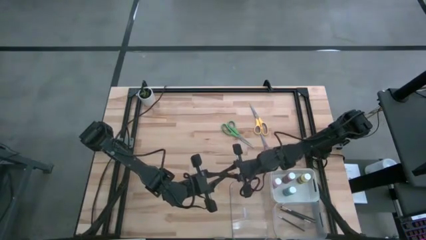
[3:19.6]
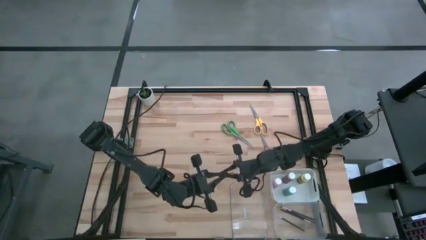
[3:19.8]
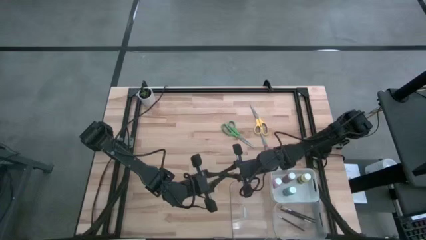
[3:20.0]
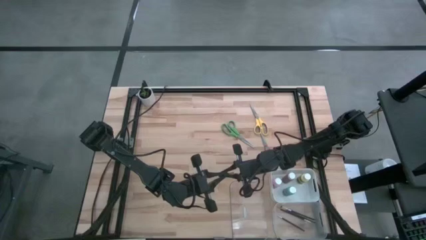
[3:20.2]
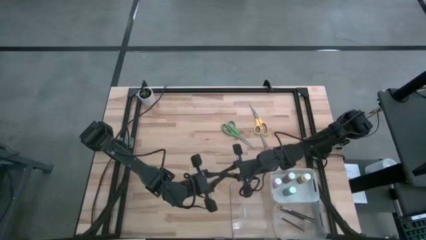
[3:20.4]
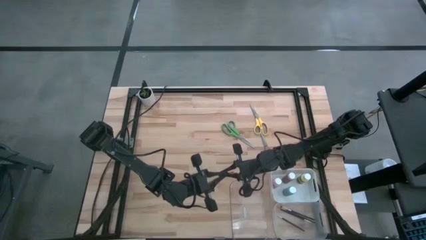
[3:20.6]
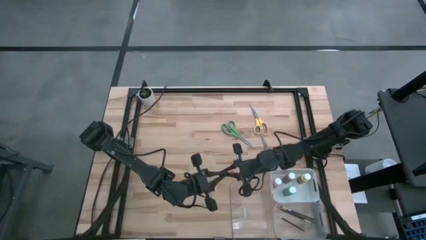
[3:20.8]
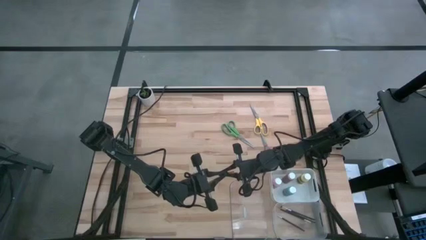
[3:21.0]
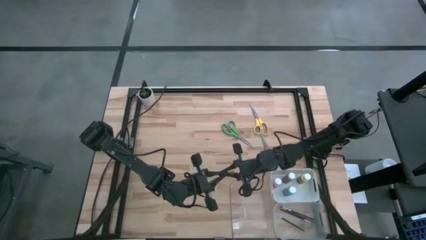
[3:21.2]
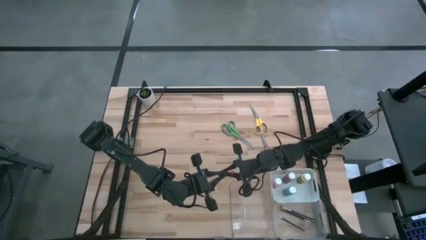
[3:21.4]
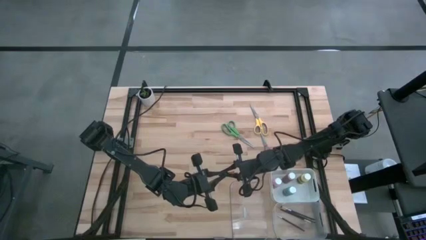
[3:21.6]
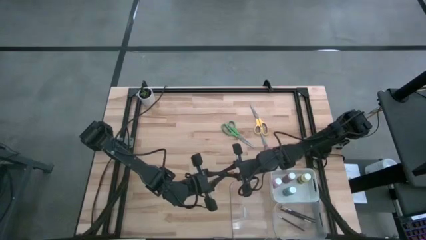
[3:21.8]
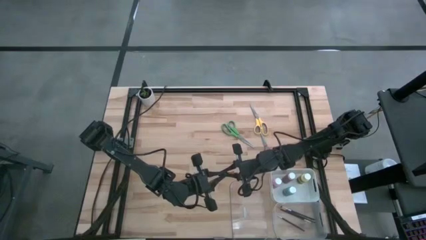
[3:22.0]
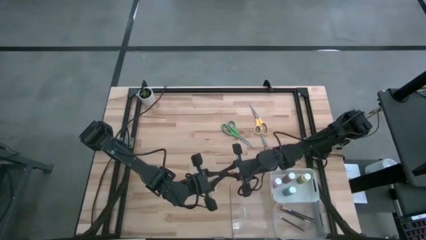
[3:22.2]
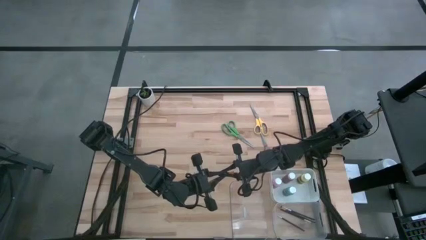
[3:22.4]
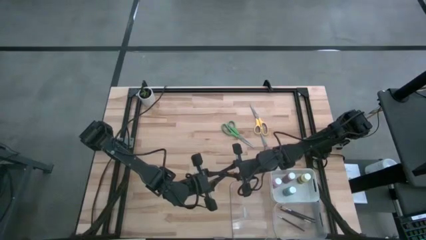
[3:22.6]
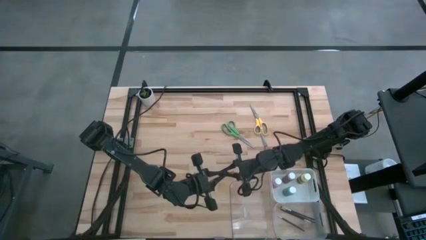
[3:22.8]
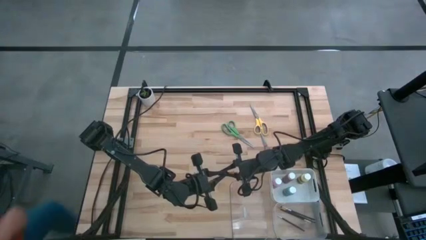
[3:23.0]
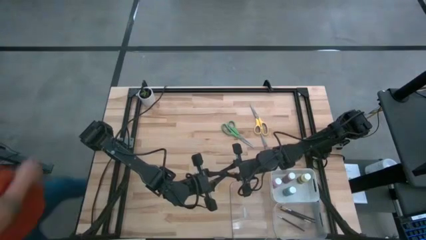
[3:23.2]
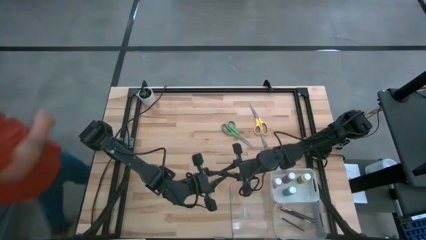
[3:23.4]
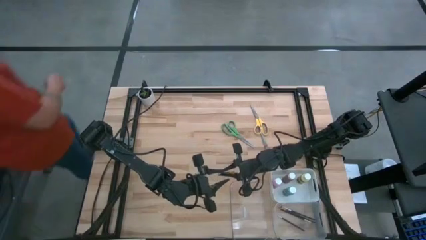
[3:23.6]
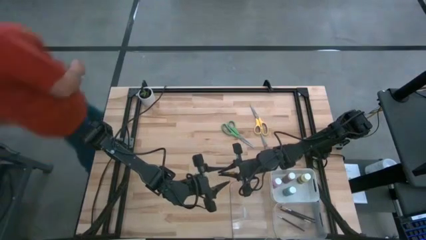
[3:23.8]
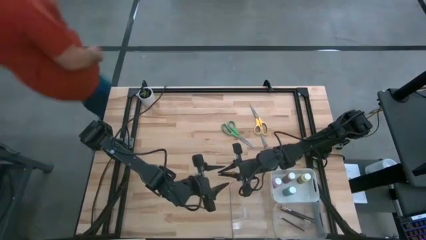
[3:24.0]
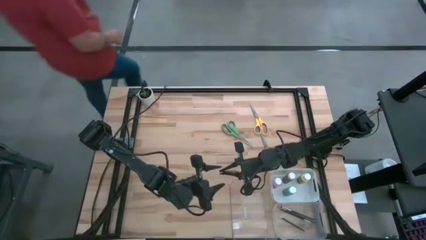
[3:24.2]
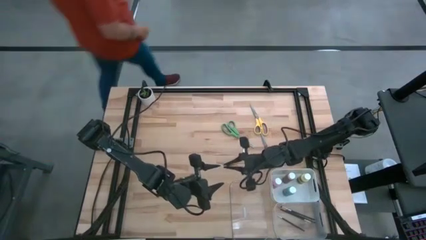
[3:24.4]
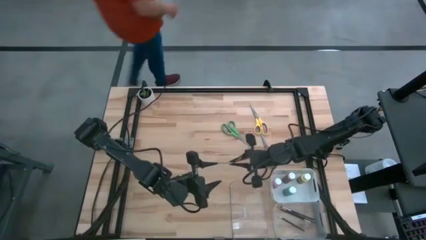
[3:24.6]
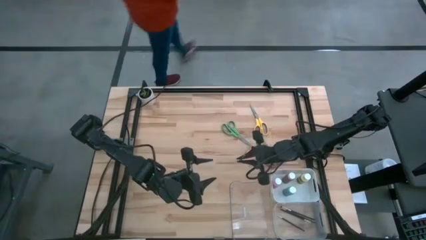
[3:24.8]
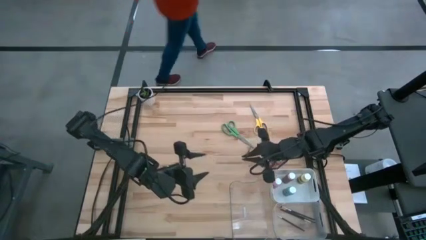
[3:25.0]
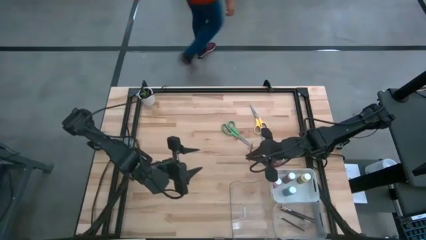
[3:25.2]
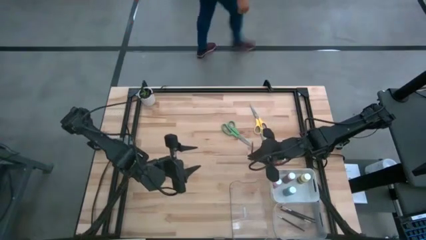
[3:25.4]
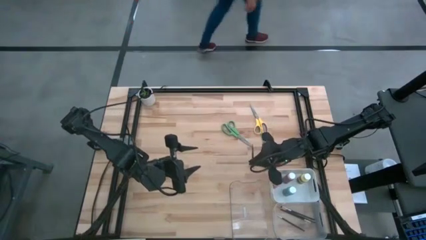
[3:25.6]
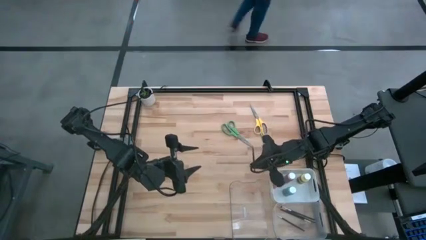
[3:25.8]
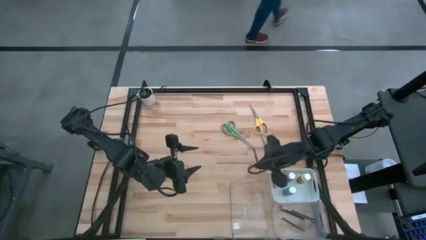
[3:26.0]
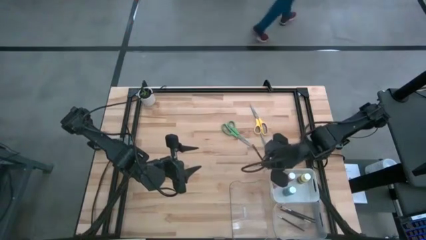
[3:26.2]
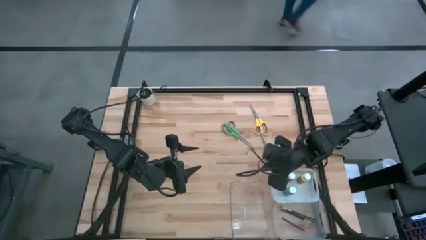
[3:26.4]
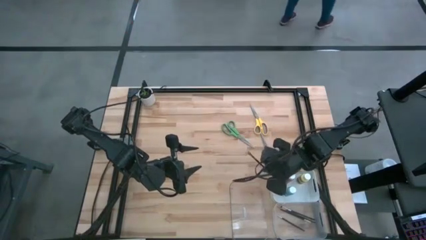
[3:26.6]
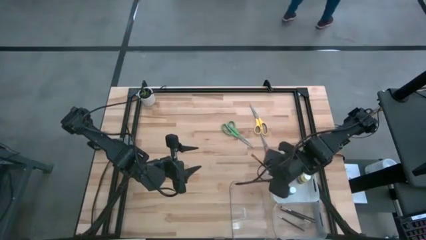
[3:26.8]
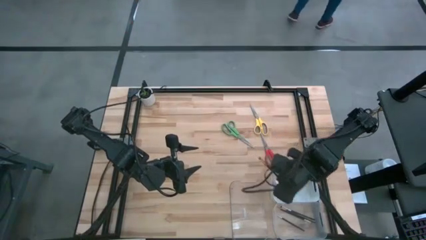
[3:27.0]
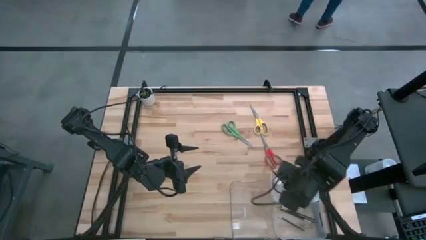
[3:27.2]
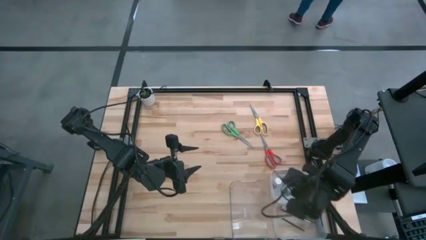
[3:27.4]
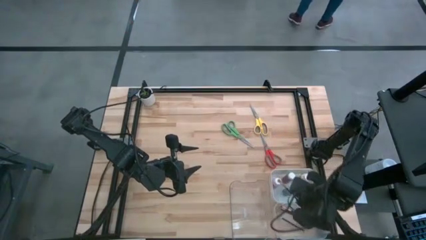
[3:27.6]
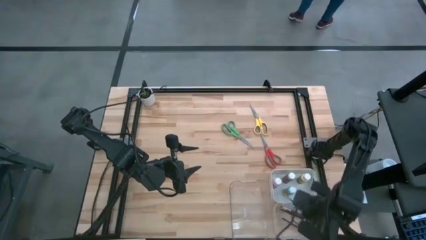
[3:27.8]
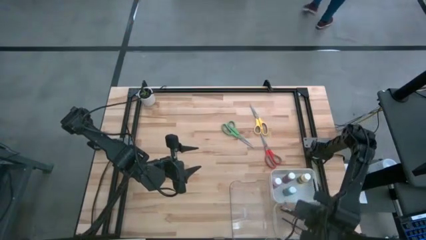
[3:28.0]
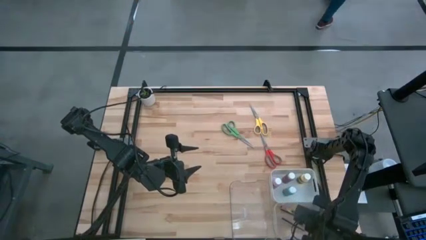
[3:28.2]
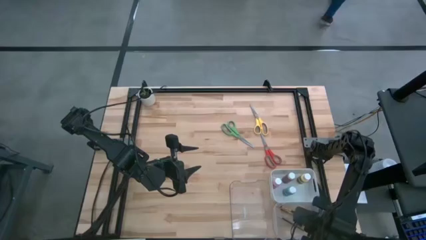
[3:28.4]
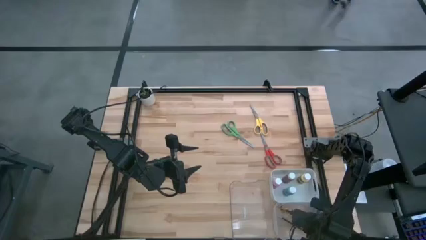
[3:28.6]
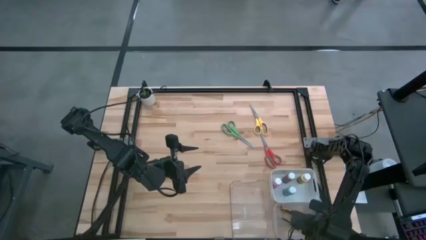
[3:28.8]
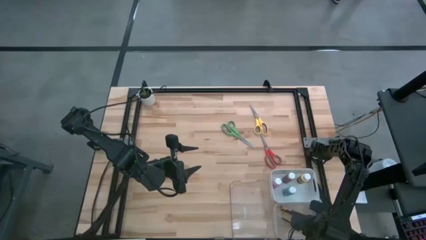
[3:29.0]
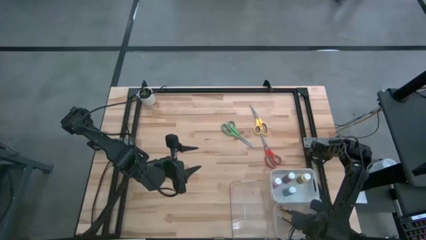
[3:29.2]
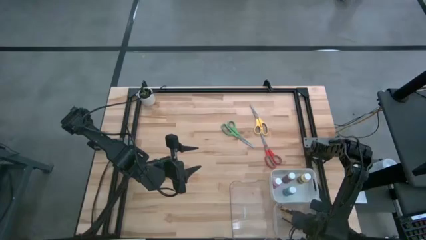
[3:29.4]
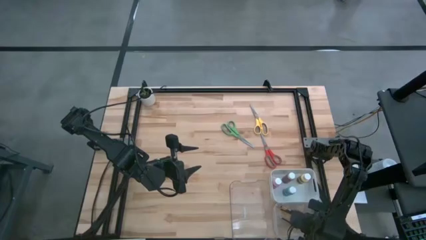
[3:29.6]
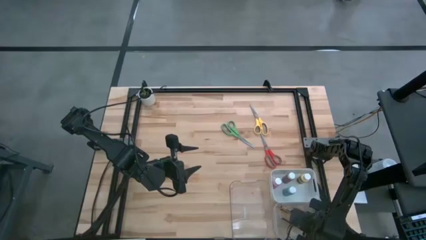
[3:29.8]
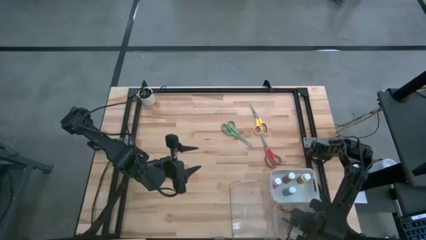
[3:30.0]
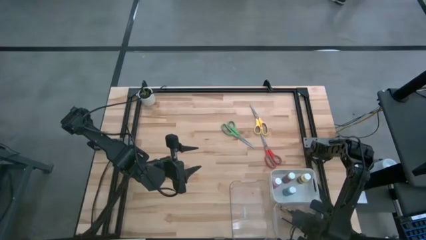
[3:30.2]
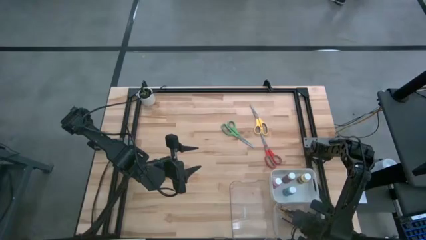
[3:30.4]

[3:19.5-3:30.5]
Task: Pick & Place Paint Supplies
Put the gold paintbrush into the right transparent bin

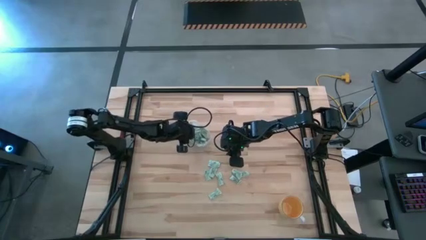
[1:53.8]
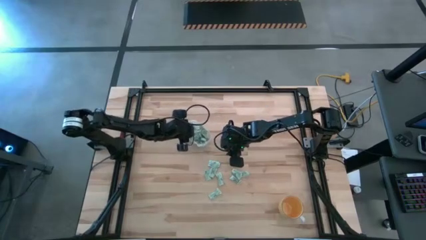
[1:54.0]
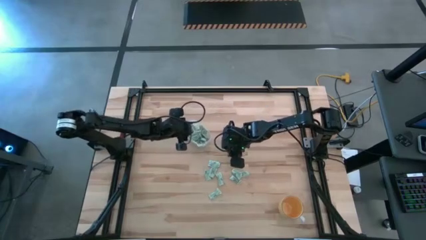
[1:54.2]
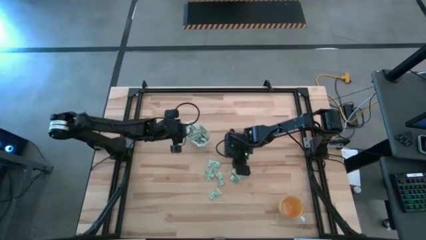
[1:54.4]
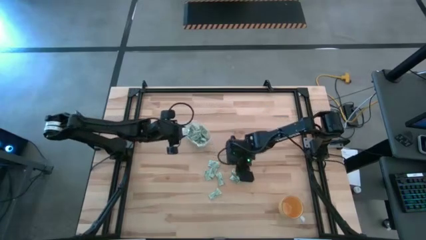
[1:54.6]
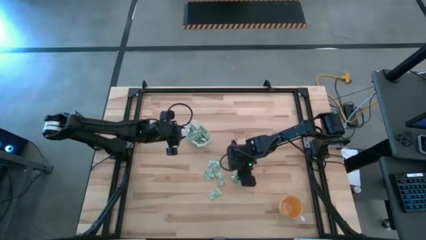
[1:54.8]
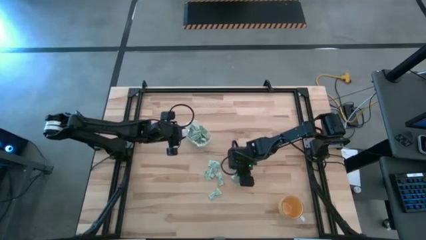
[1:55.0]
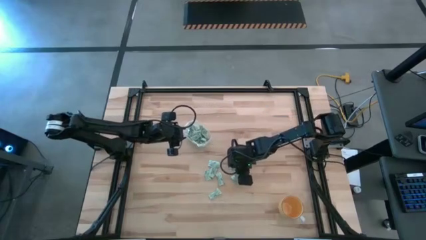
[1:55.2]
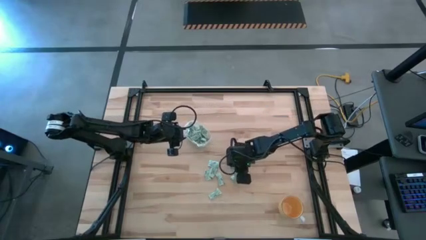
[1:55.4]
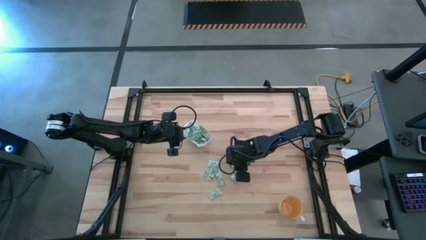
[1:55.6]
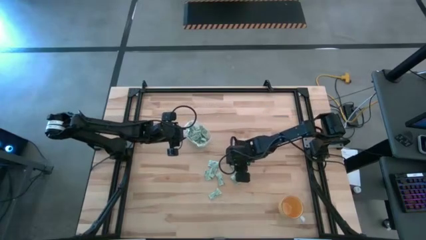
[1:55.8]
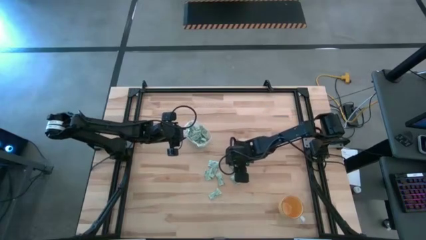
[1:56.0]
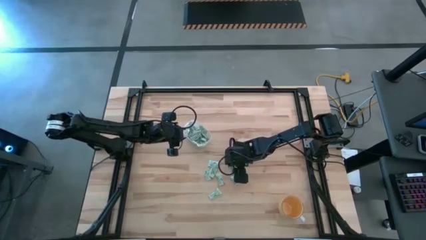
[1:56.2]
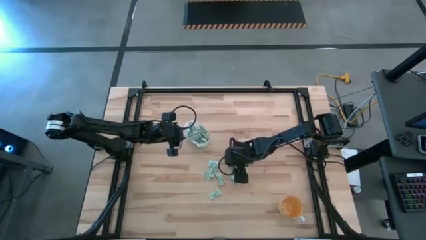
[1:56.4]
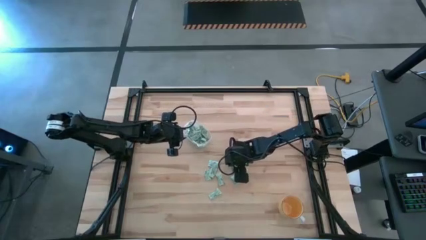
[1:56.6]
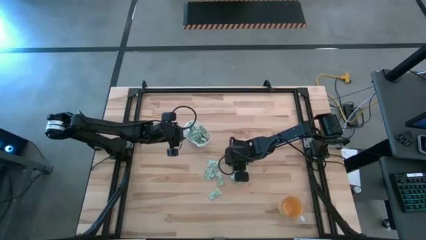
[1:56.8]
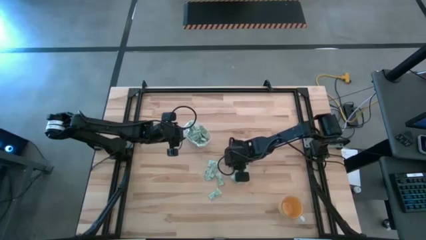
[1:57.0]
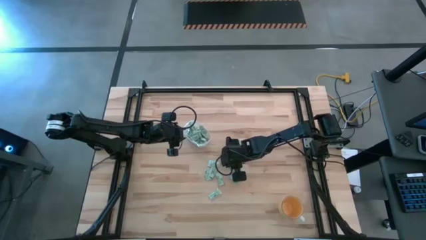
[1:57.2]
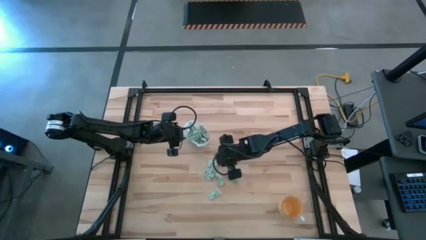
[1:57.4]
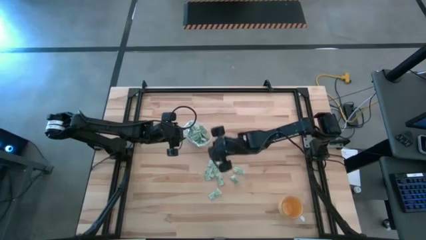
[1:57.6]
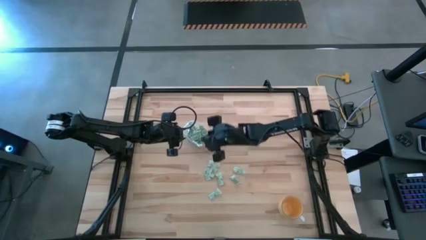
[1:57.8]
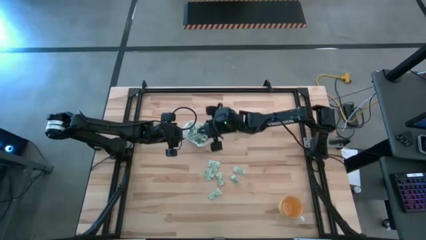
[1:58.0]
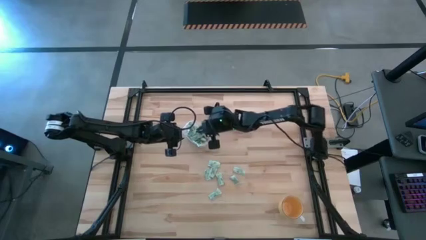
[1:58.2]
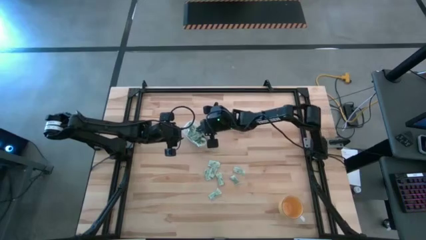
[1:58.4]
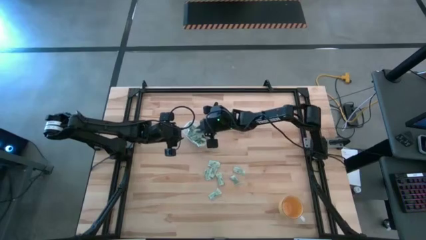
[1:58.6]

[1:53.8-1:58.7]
Task: Pick and place Stevia / Truvia into bins
Put the stevia packet into the transparent bin

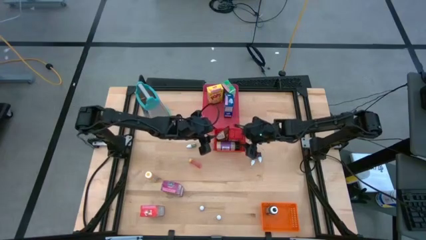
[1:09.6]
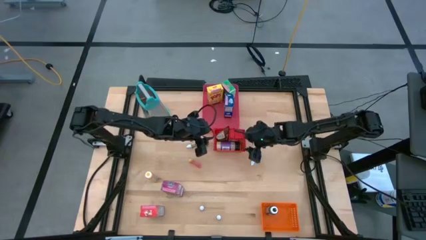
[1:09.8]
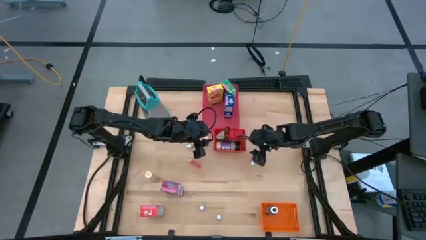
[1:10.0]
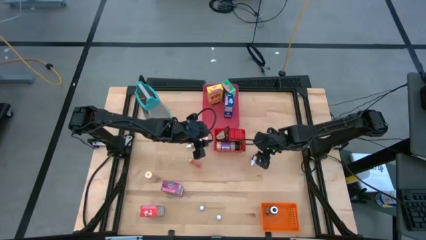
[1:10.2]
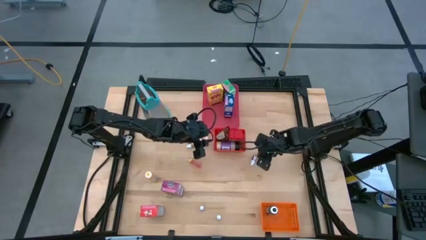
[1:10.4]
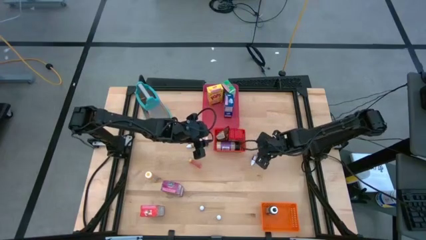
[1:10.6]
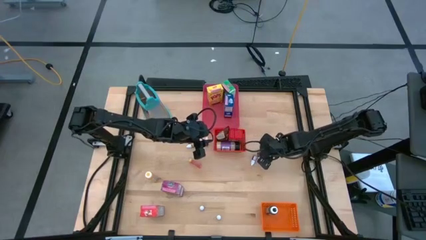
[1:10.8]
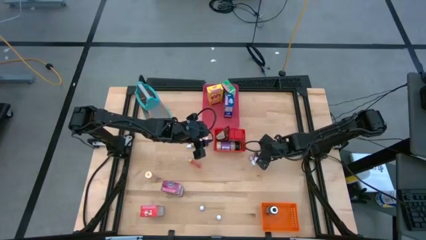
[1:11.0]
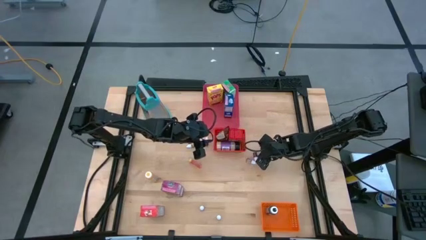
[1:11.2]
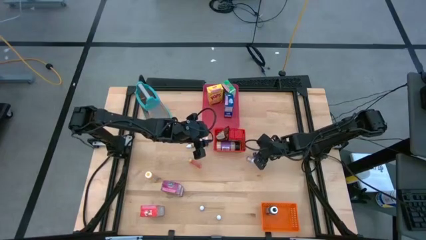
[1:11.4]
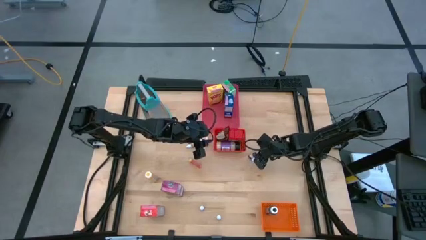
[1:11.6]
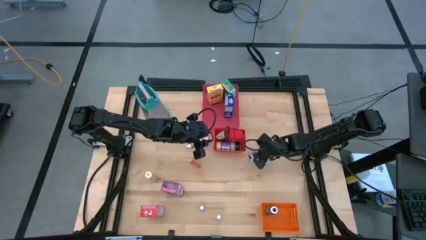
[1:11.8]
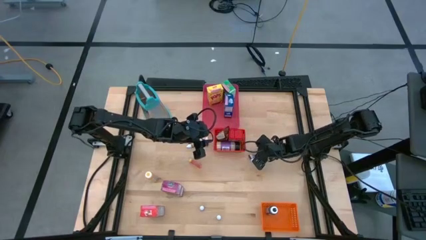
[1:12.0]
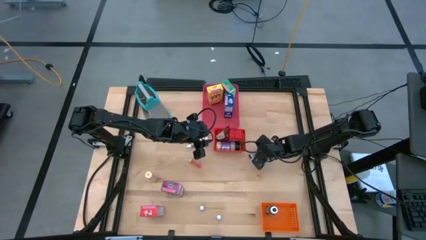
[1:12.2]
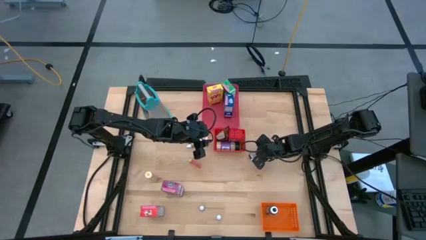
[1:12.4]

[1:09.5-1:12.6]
Task: Pick & Place Kitchen Items
Put the violet food coloring bottle into the orange bin
